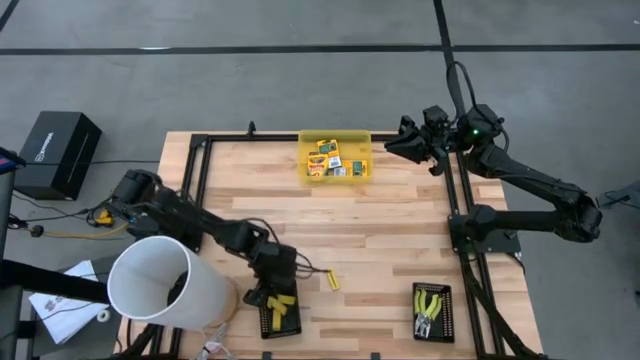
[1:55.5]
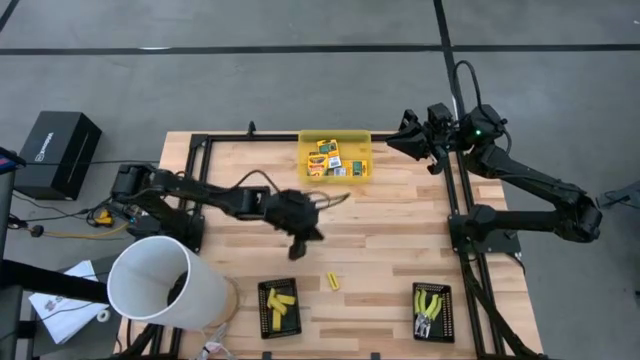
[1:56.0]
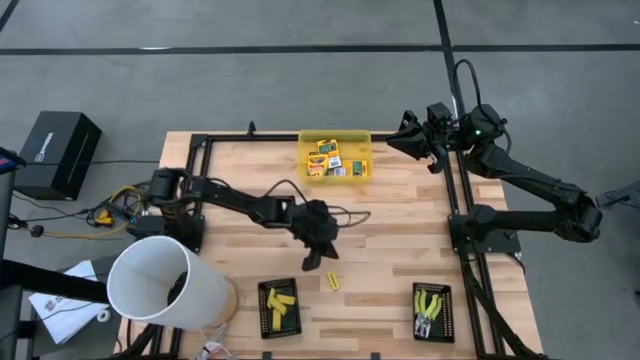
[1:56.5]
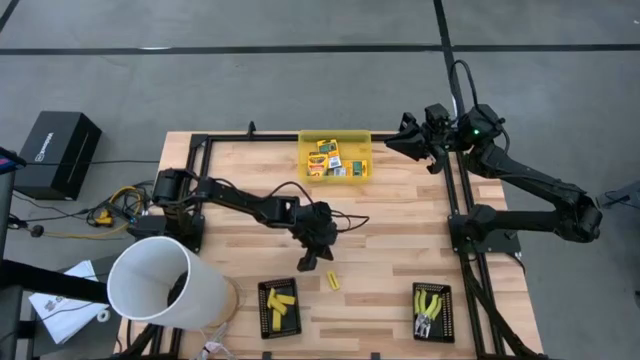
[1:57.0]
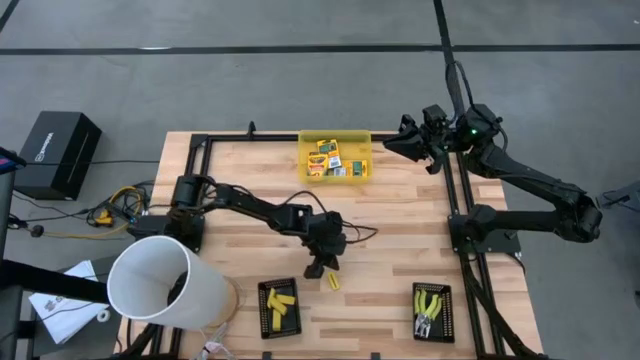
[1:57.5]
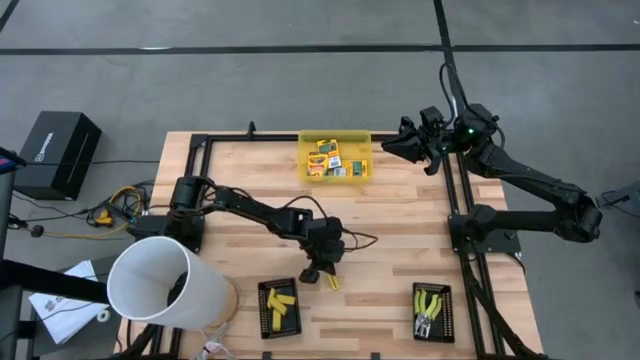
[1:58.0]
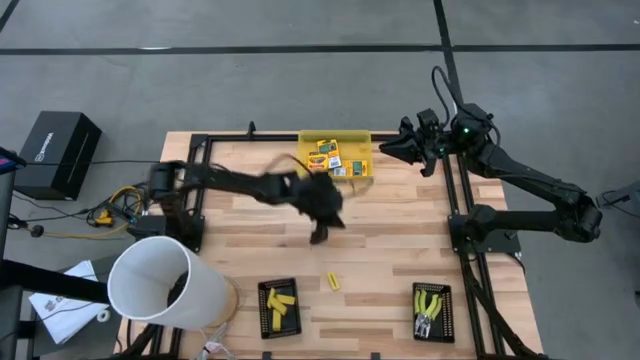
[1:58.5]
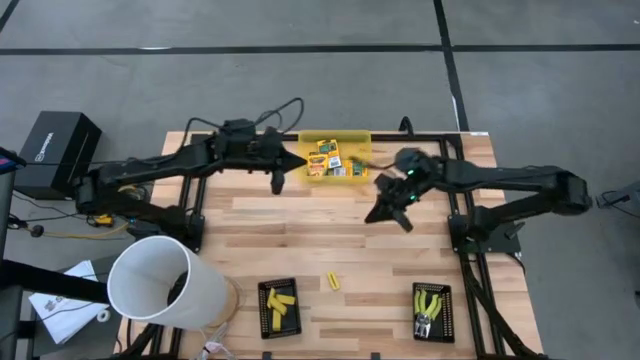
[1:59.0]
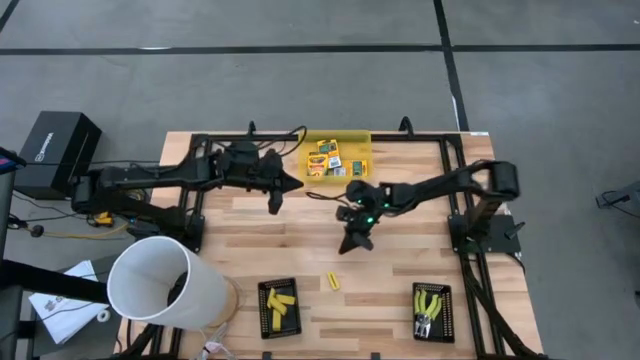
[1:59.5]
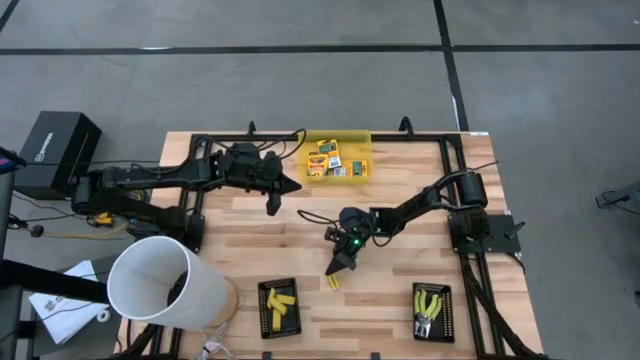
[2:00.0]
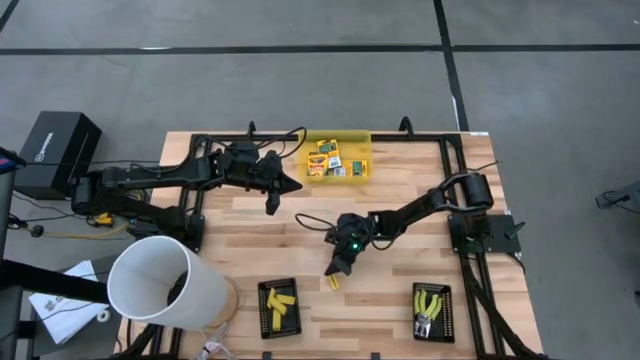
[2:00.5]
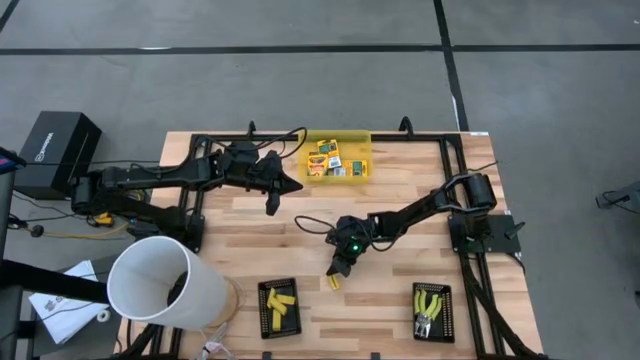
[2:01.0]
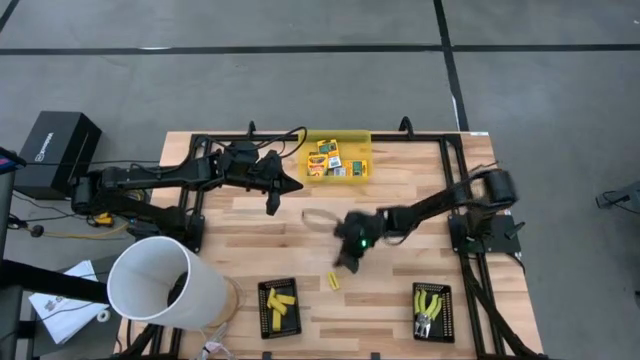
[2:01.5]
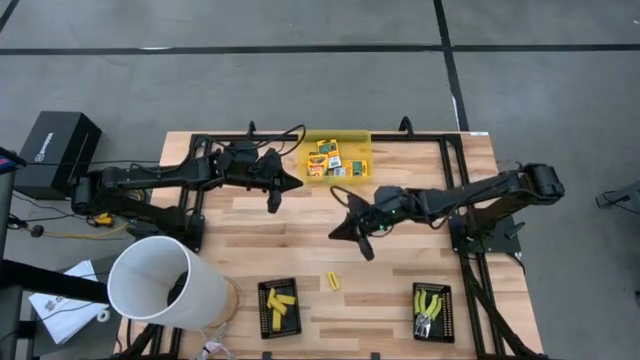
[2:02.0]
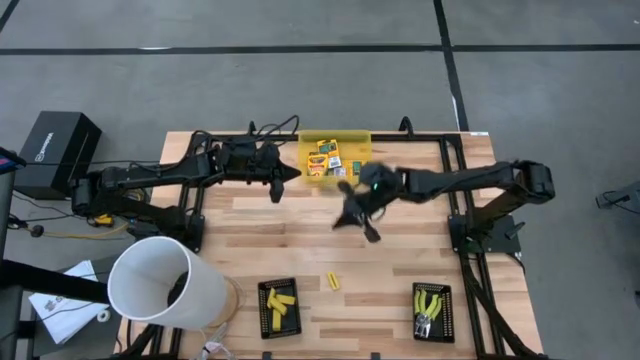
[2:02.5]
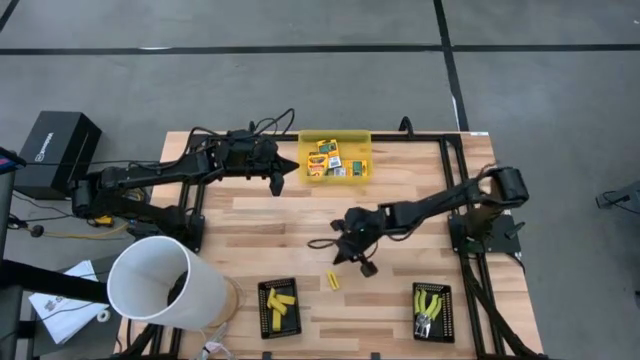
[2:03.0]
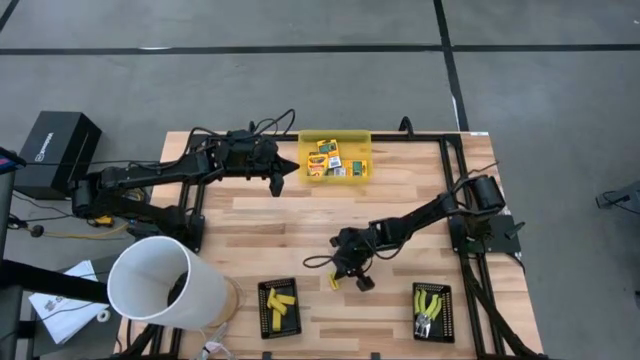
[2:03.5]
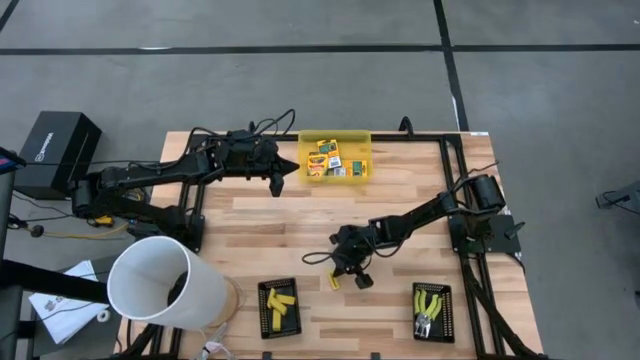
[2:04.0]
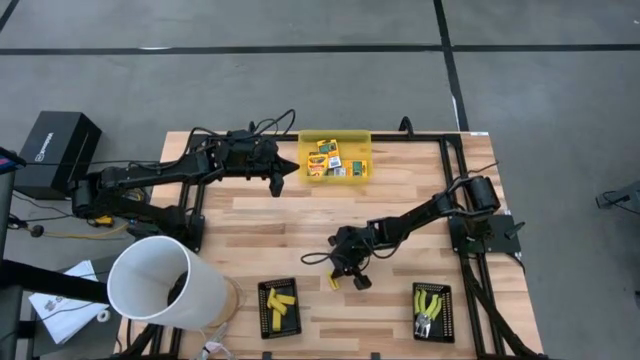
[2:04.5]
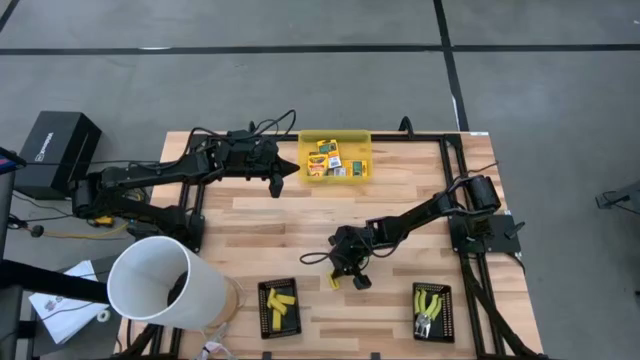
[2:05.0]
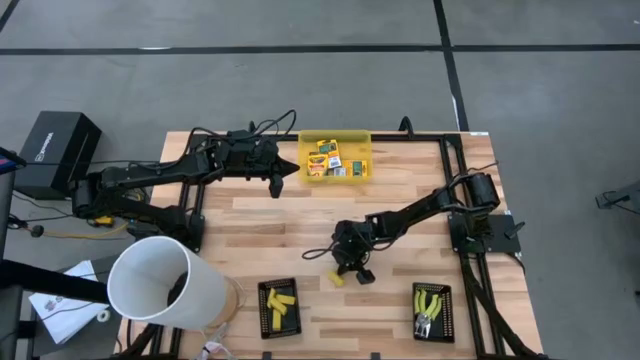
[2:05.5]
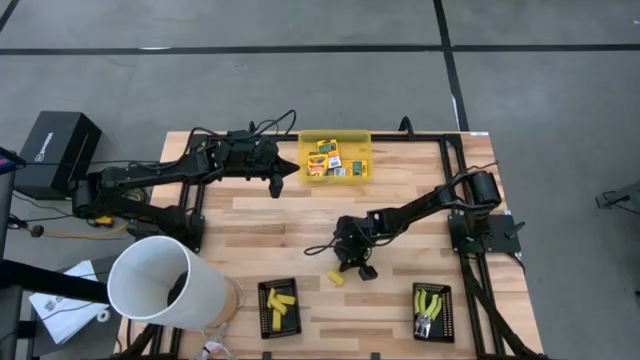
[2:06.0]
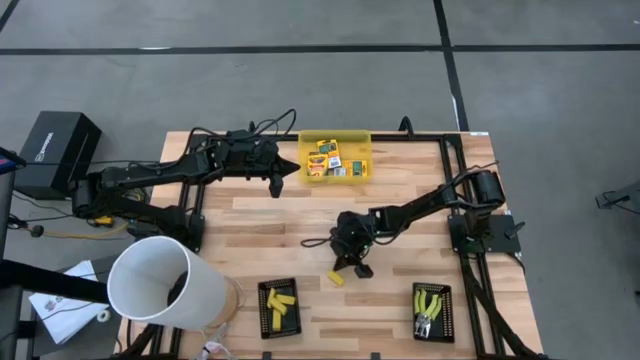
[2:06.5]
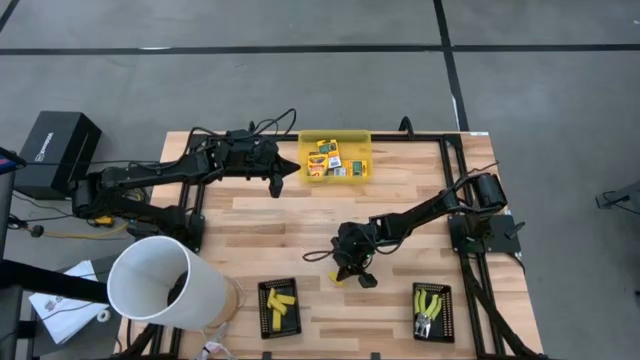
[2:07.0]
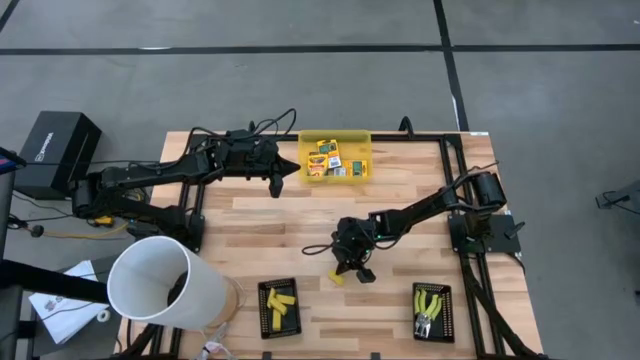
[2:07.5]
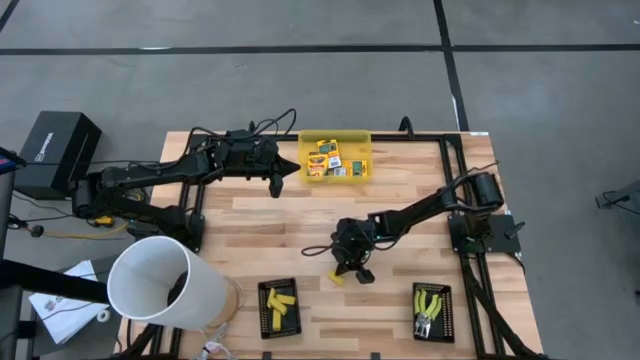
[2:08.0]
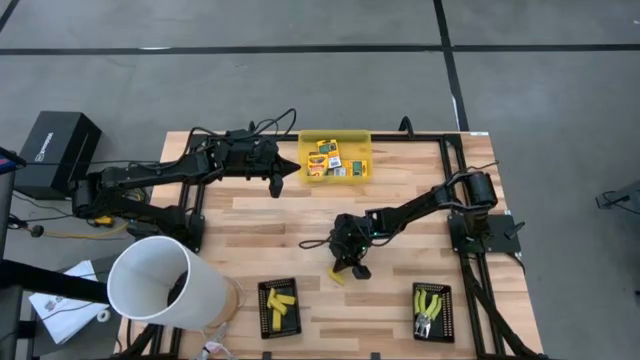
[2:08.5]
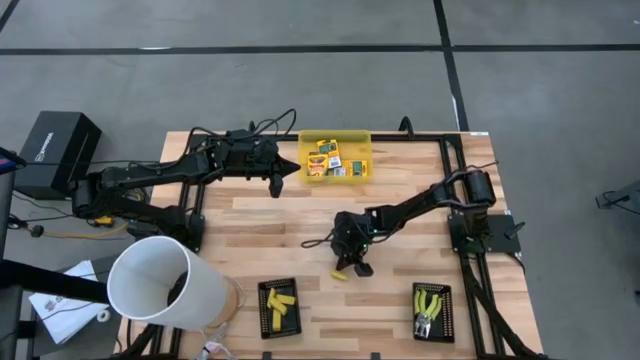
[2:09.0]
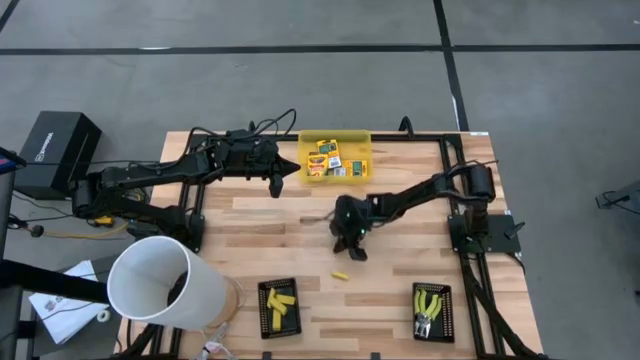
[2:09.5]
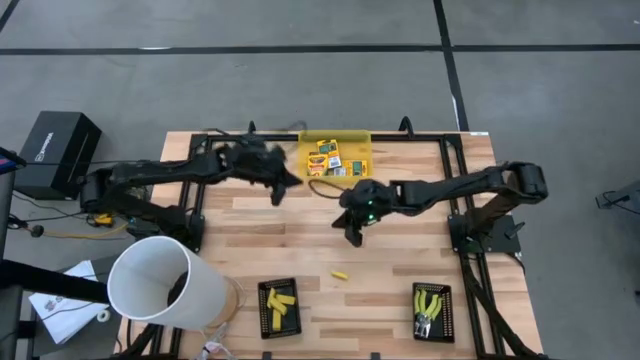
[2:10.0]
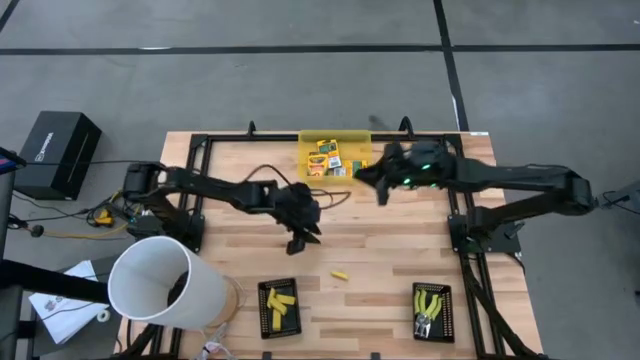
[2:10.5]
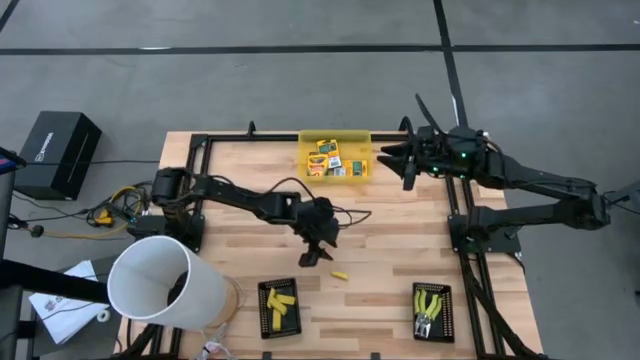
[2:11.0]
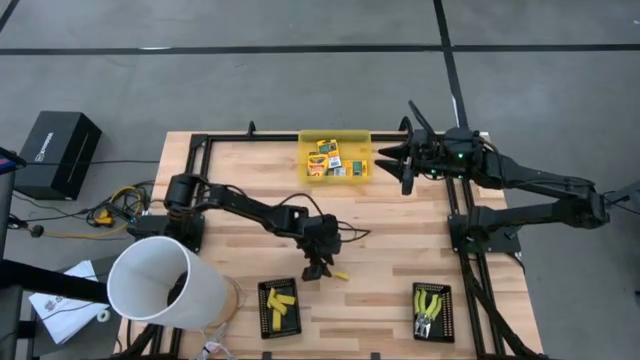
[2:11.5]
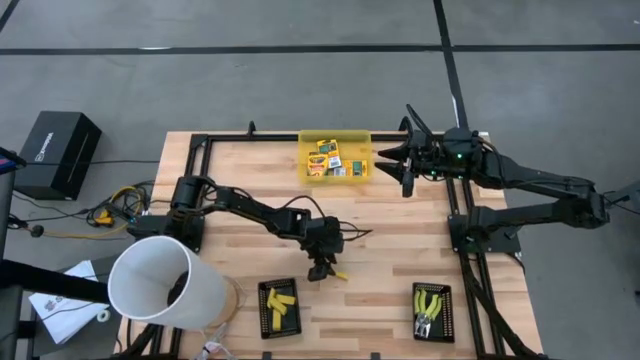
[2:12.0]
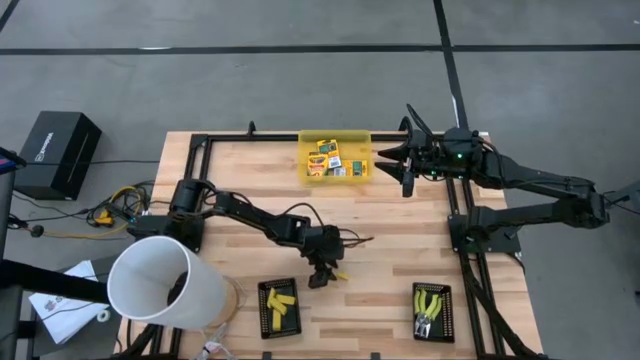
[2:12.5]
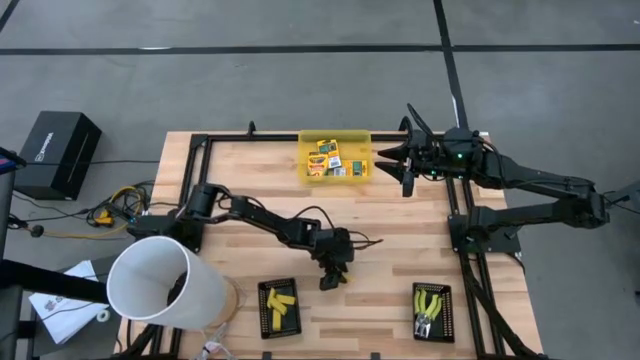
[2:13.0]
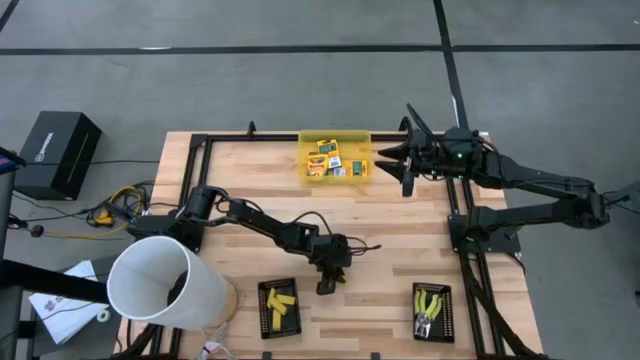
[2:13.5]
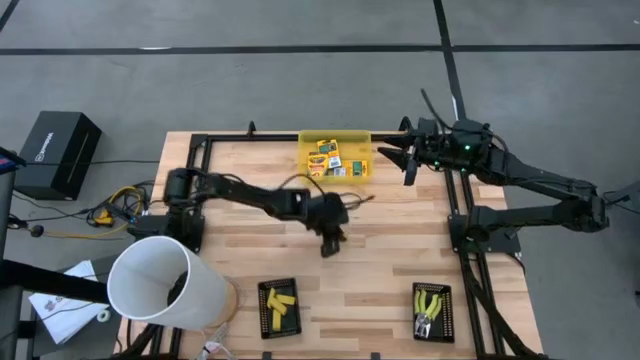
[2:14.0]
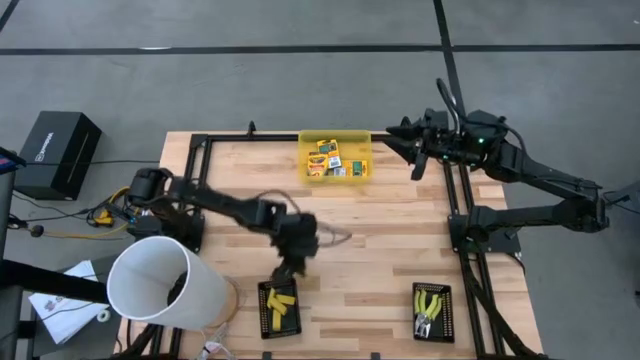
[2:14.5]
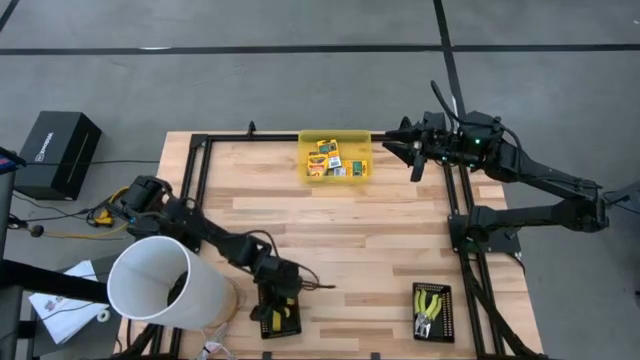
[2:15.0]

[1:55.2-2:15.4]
Task: Pick & Place School Supplies
Put the yellow eraser into the left black bin

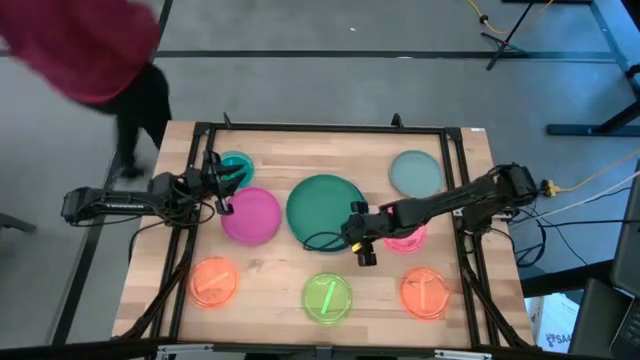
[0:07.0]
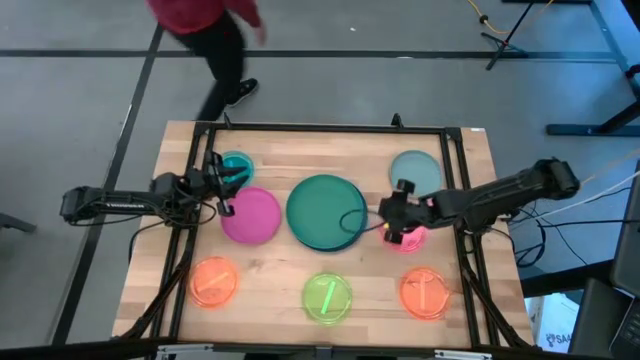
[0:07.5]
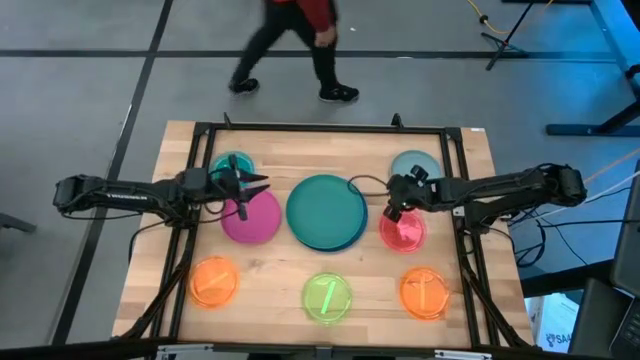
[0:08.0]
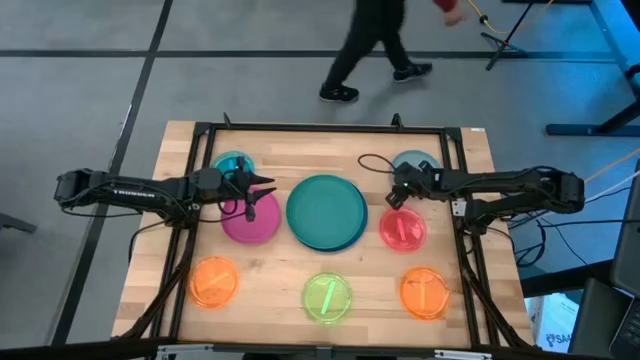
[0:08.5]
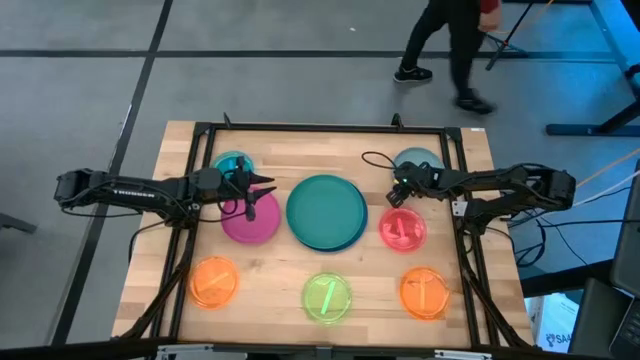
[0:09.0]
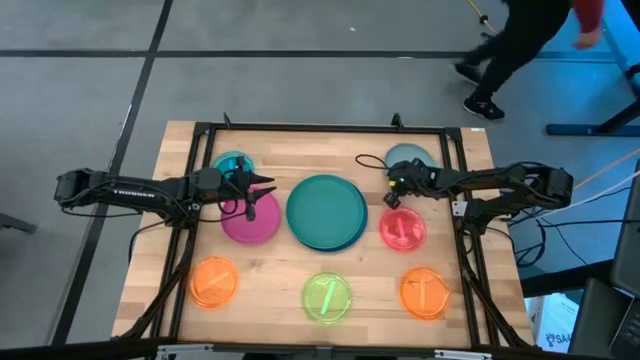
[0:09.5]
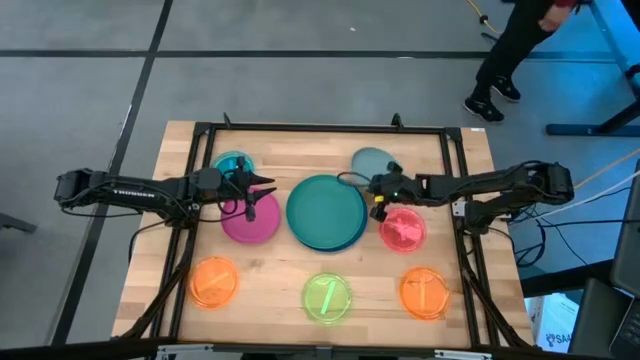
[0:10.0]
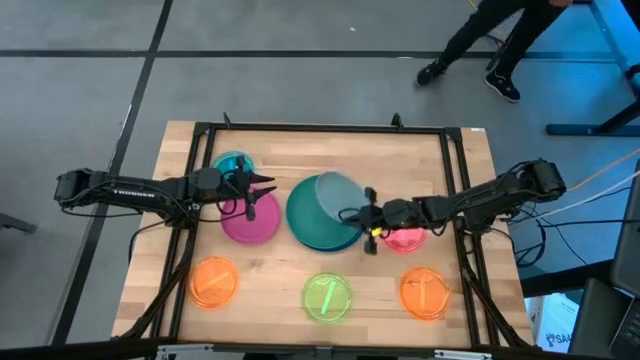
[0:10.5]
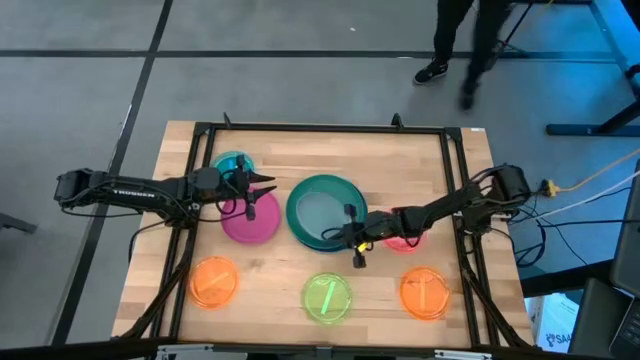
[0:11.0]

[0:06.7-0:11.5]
Task: Stack plastic plates
Stack the light blue plate on top of the green plate
